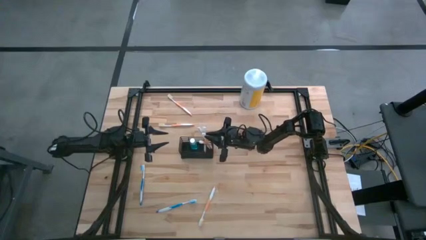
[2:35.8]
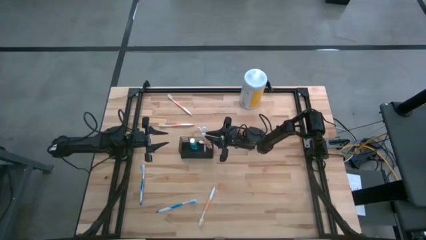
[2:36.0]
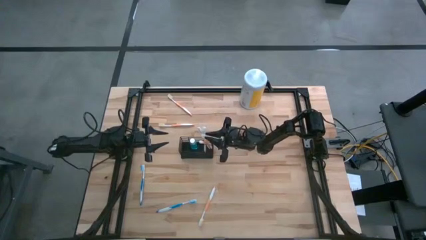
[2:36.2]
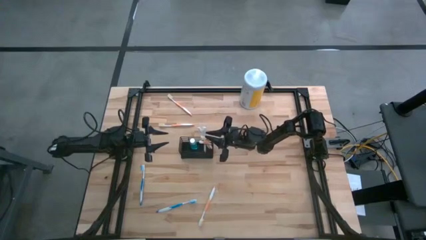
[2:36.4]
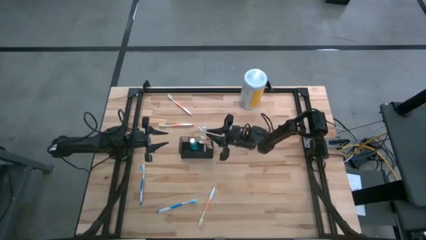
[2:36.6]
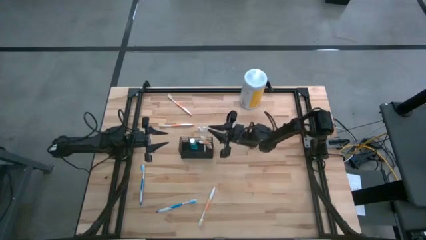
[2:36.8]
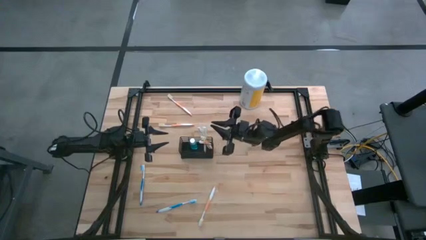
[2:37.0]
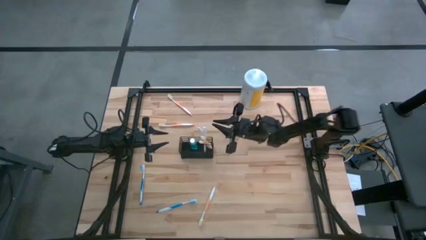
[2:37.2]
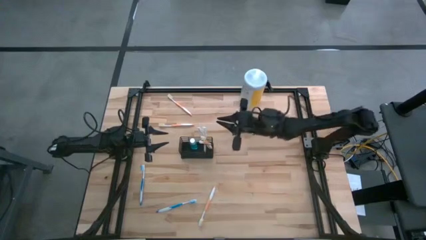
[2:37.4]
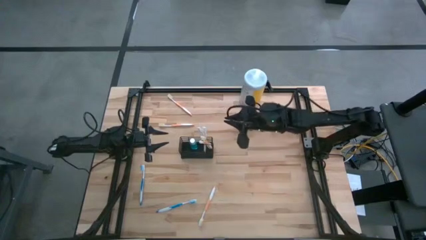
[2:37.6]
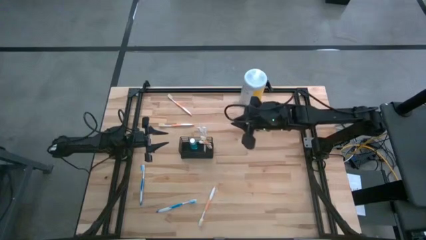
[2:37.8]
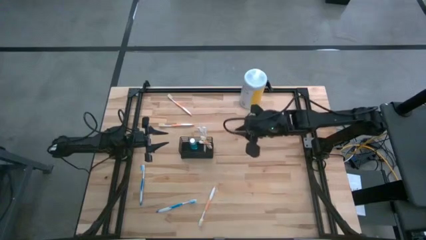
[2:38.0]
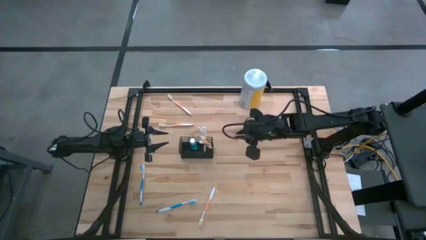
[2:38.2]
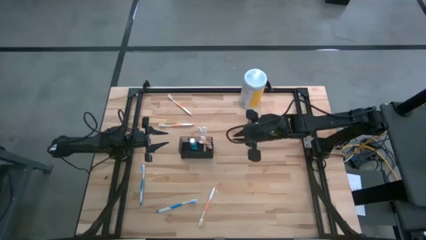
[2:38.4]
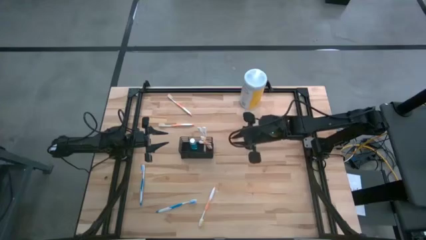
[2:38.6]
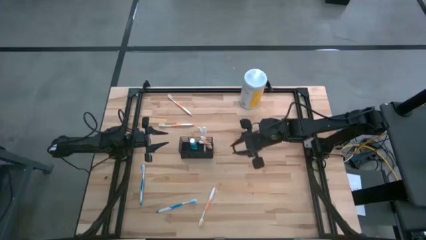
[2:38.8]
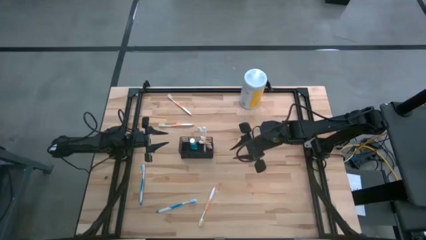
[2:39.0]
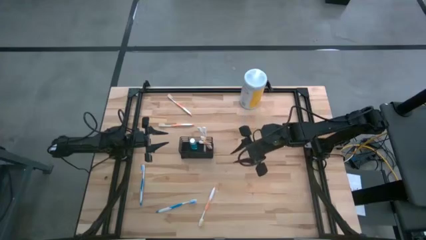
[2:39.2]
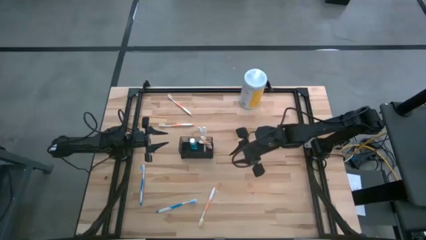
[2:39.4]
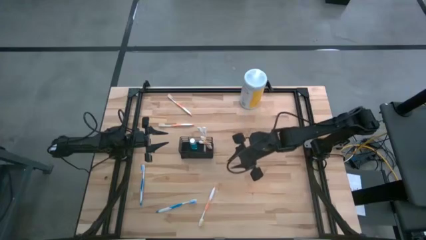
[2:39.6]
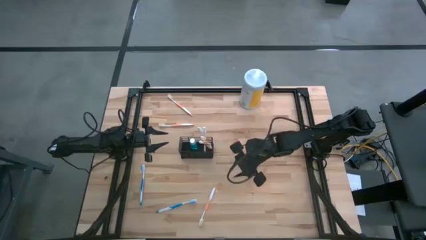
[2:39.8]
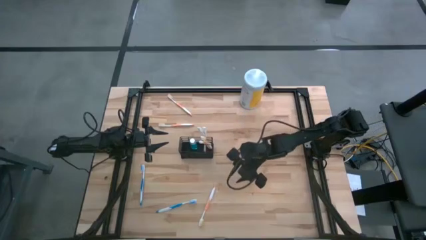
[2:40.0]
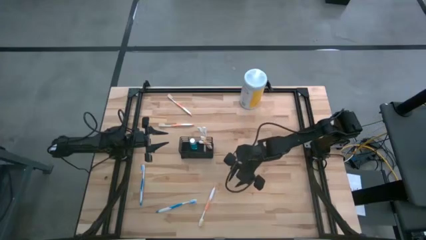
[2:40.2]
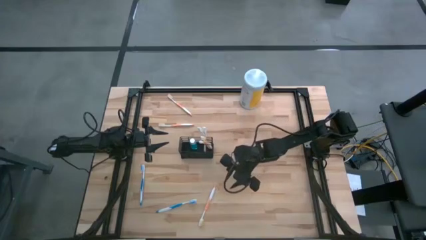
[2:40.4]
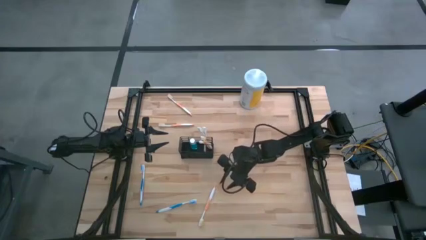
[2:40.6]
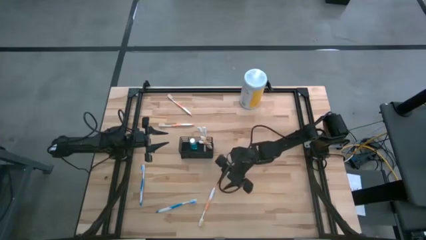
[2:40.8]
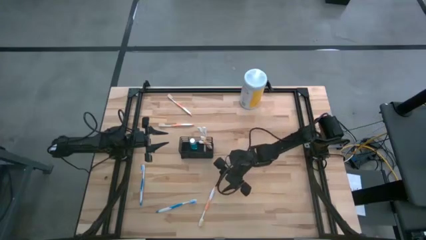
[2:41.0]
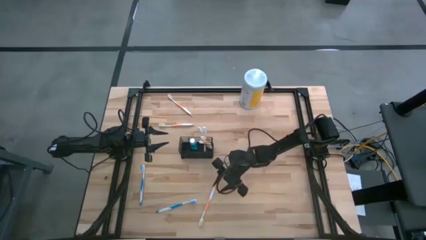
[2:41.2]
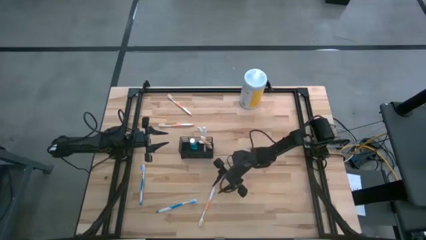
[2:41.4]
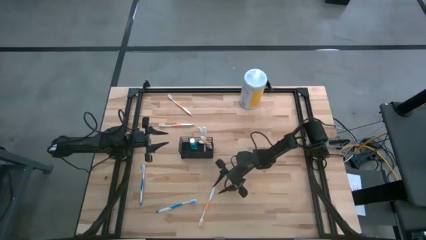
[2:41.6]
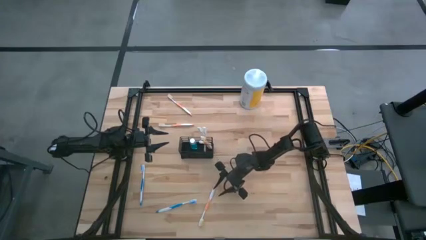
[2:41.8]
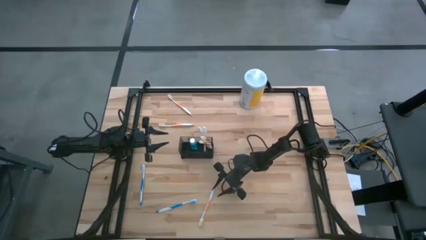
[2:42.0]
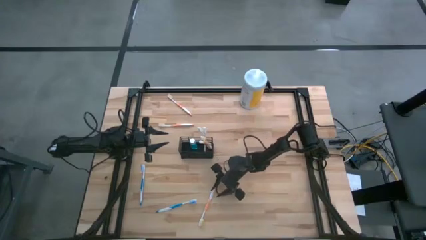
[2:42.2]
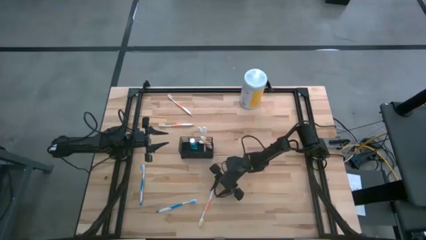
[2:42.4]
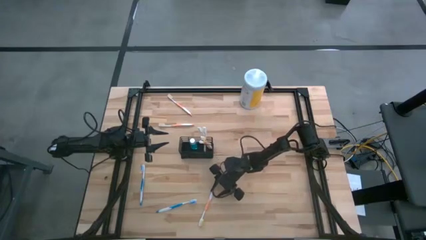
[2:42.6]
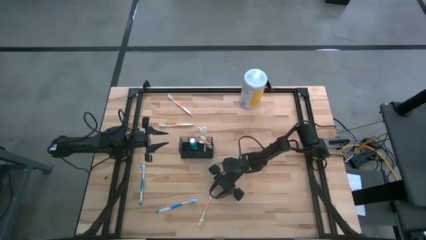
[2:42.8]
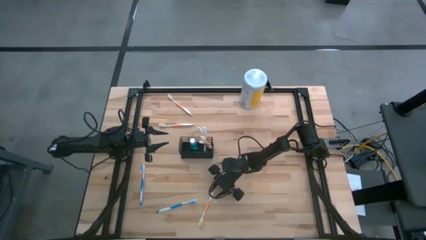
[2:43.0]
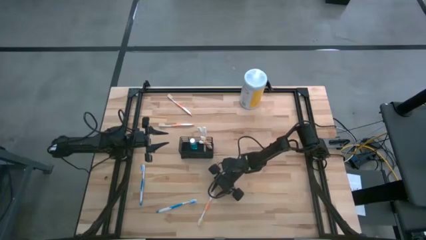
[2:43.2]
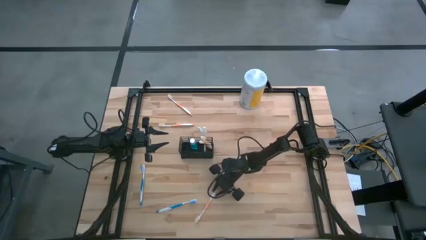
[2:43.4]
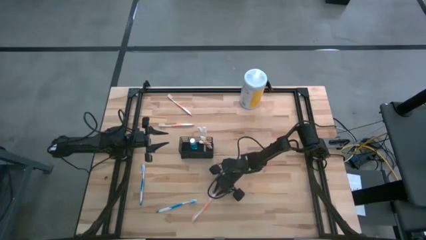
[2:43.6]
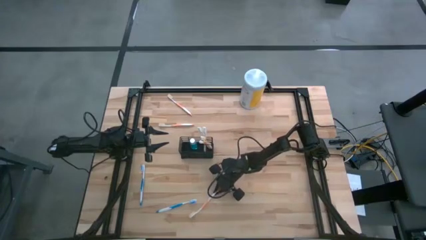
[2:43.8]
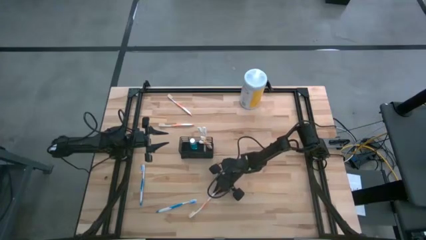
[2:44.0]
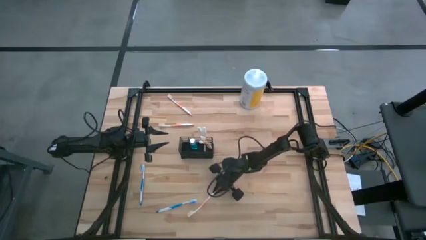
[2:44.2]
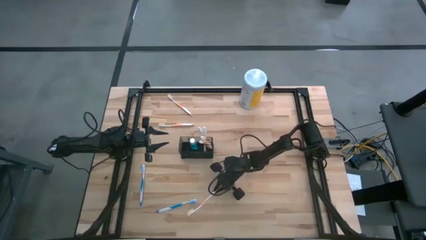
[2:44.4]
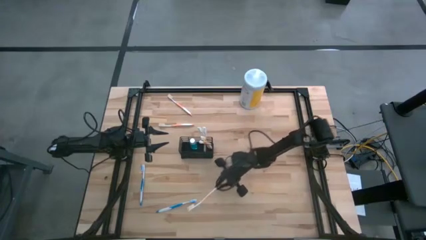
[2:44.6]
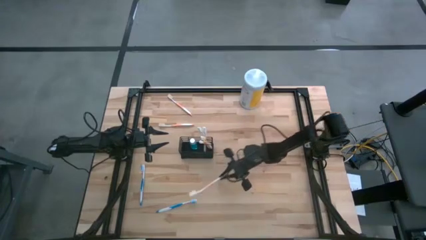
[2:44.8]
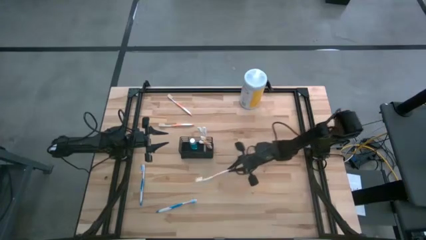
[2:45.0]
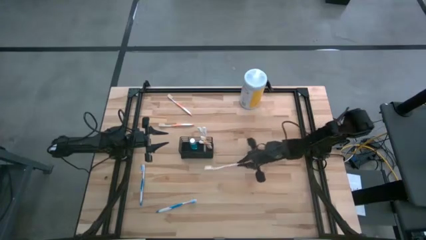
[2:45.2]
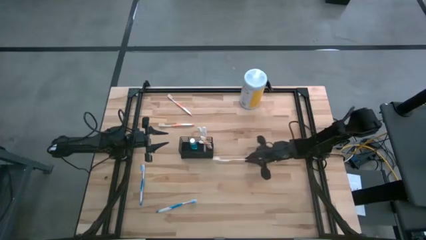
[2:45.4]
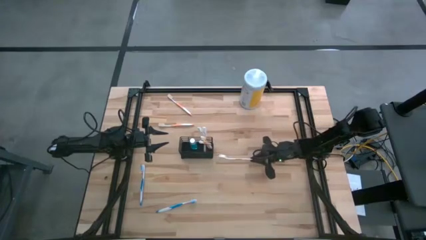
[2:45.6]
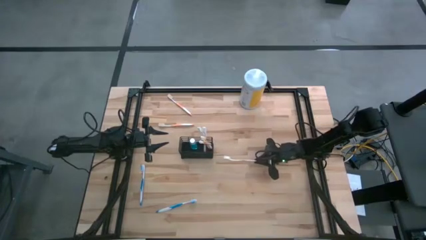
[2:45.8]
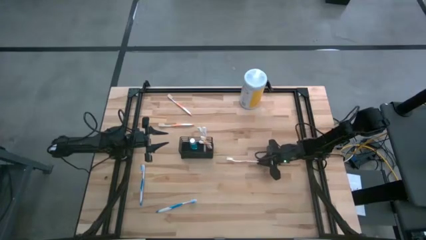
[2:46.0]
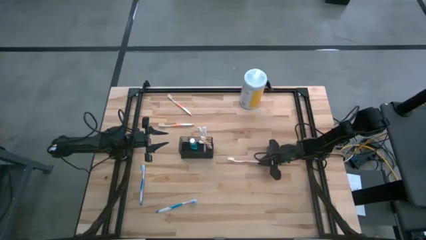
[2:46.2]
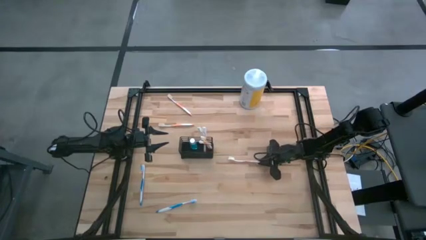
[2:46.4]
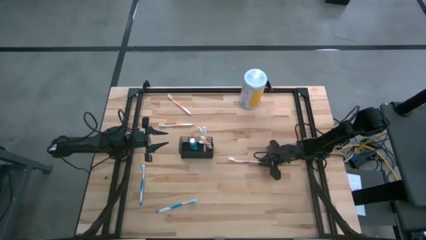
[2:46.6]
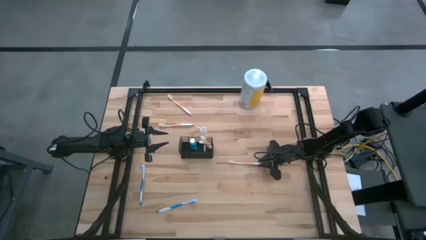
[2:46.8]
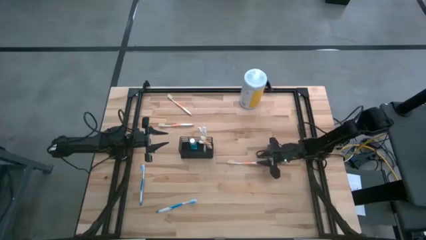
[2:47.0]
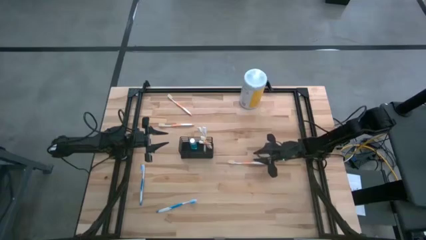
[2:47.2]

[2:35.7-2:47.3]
Task: Pick & Place toothbrushing station
Put the orange toothbrush into the right section of the wire organizer

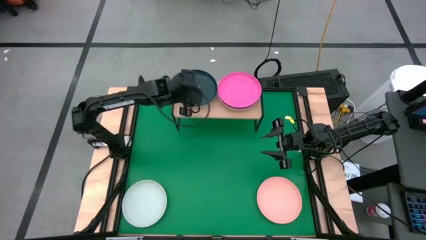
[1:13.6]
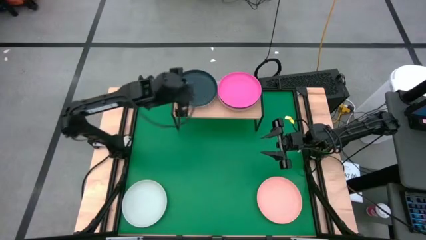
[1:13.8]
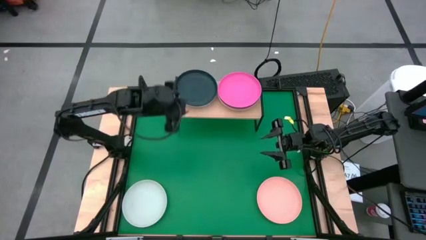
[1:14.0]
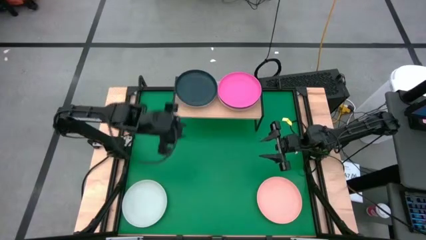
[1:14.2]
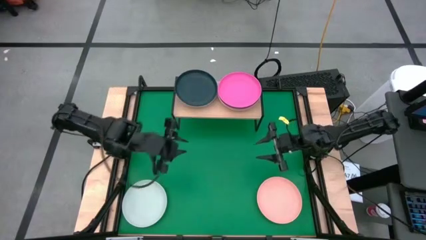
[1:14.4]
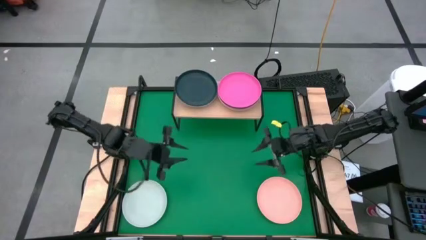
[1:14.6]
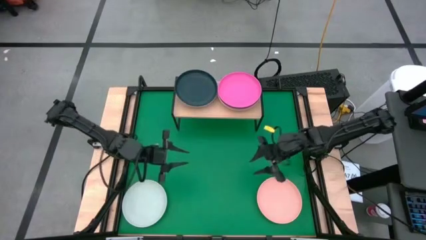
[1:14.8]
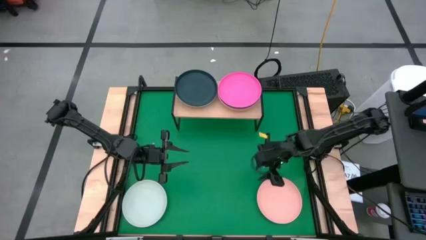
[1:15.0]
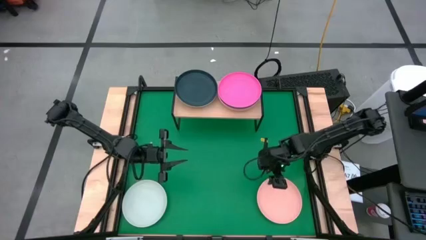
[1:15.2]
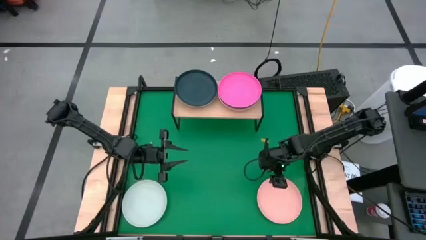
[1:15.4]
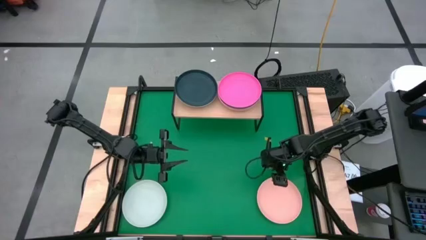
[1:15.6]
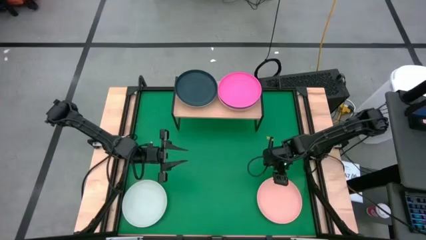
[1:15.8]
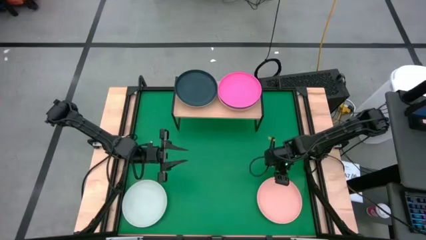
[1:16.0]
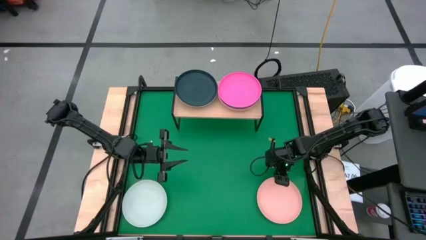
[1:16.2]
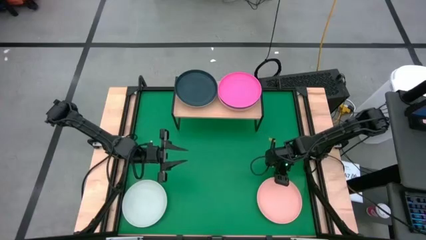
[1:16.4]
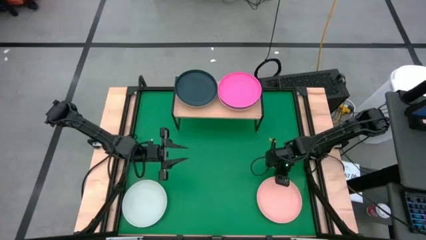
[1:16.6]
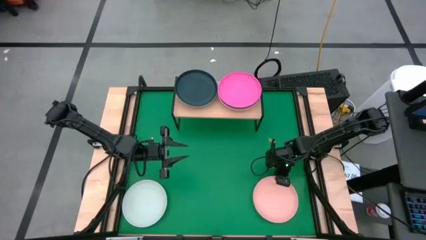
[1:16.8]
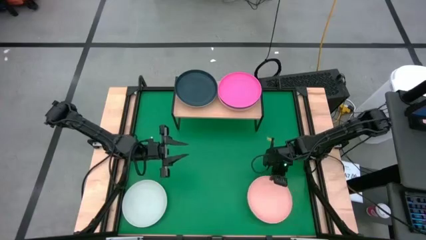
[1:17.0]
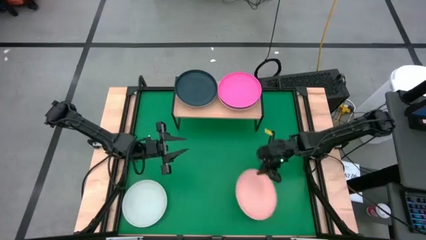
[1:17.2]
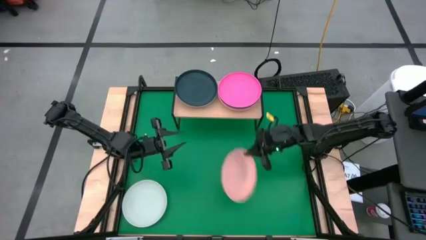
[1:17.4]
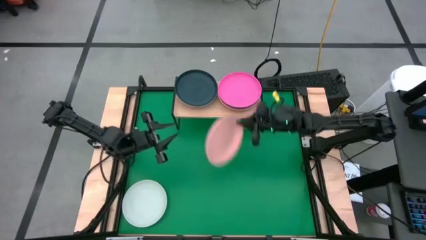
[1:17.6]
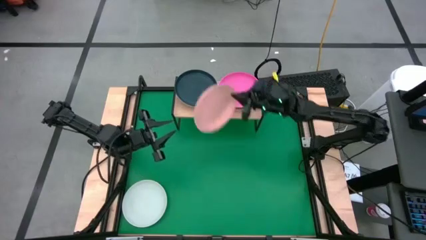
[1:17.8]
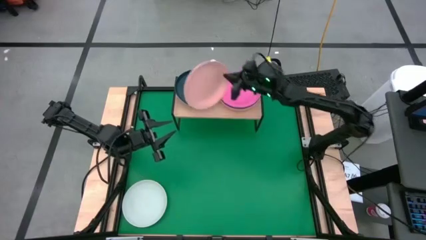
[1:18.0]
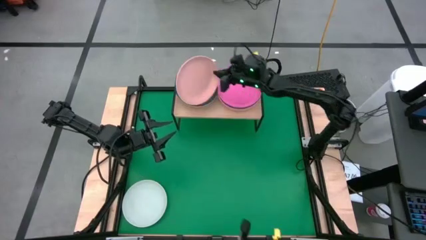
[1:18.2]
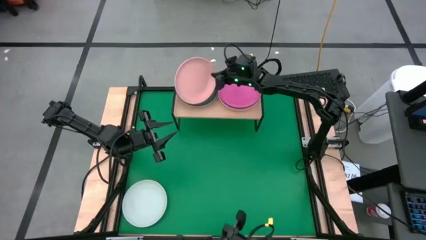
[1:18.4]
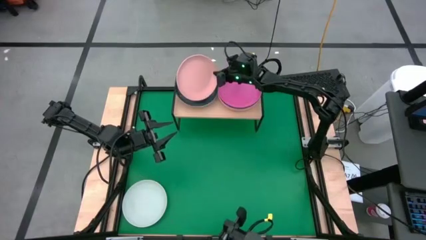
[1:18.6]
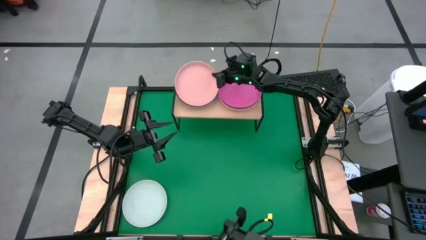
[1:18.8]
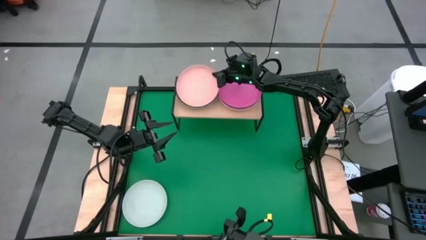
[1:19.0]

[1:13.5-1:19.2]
Task: Place and stack plates onto a shelf
Stack the light orange on top of the dark blue plate on the shelf
